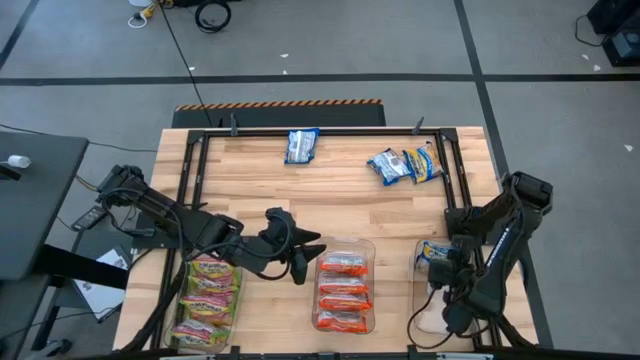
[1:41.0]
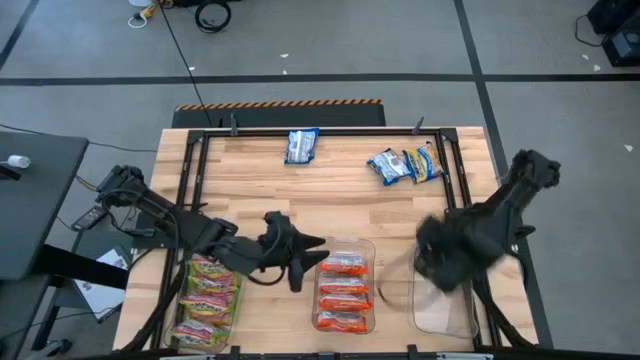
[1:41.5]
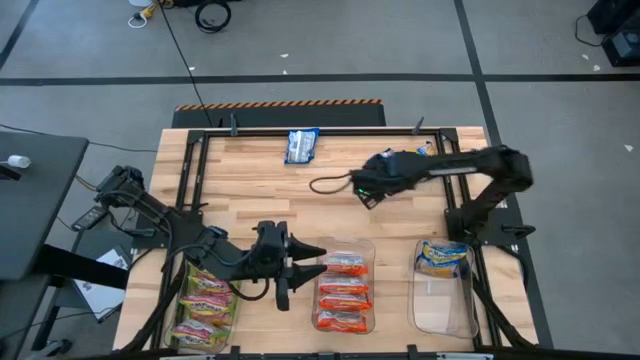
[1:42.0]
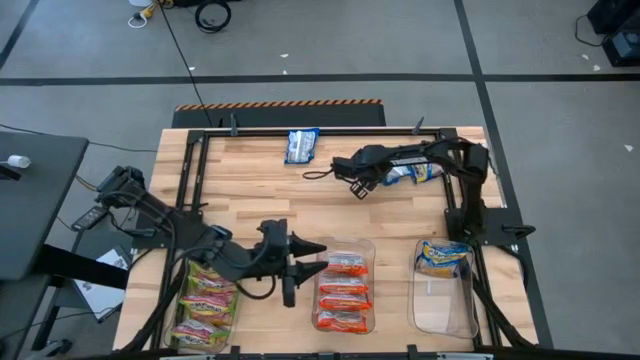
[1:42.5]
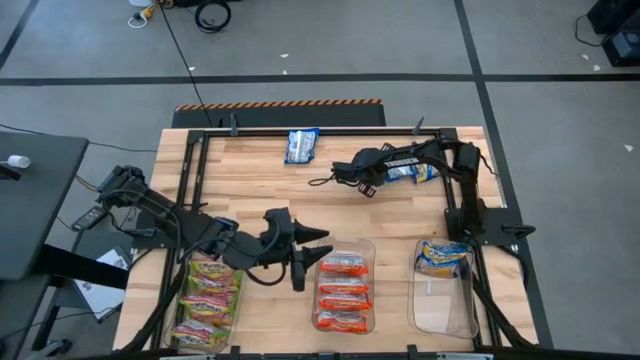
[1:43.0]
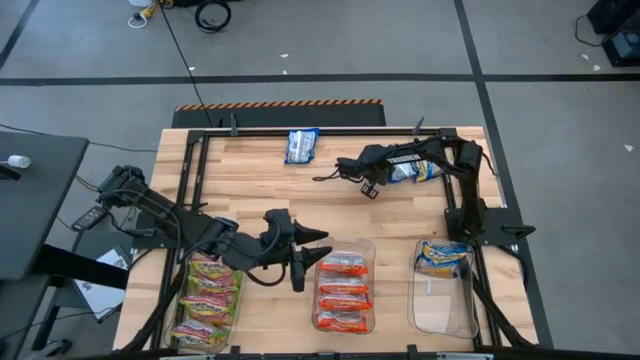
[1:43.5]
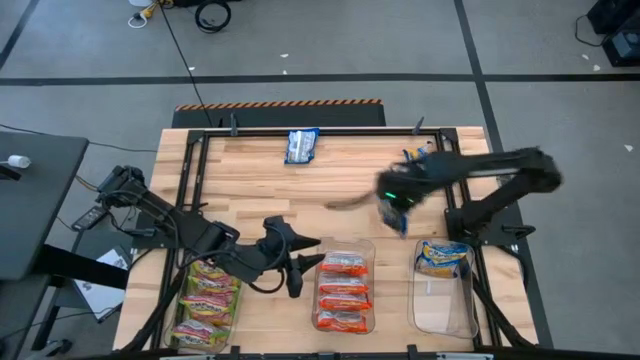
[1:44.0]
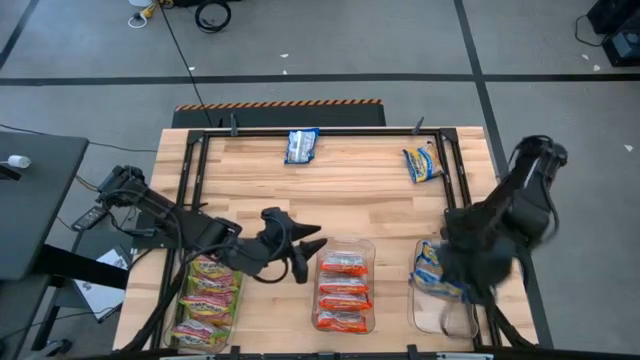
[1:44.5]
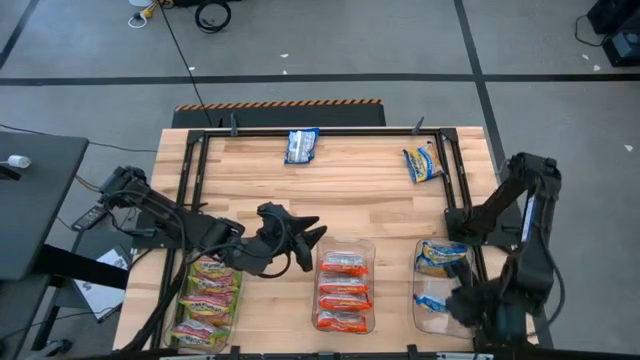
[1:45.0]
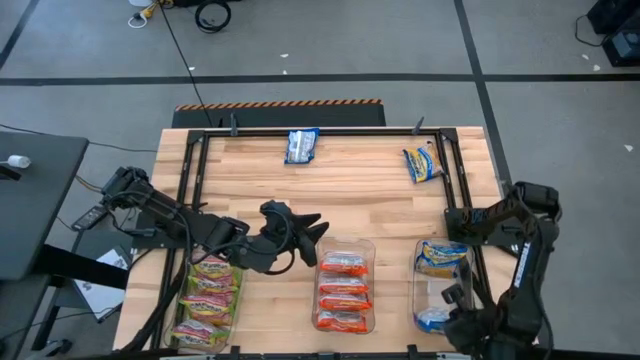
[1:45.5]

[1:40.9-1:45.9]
Task: Sort Maruchan noodles
Put the blue noodle pack into the right transparent bin

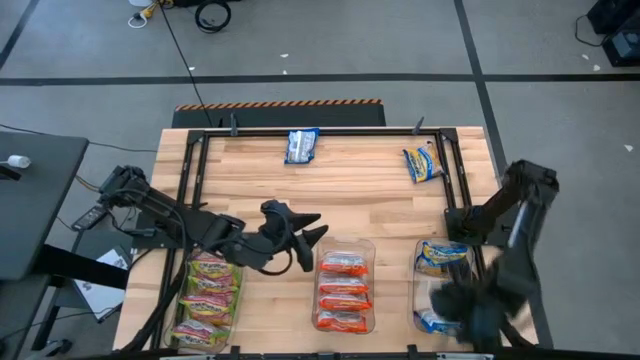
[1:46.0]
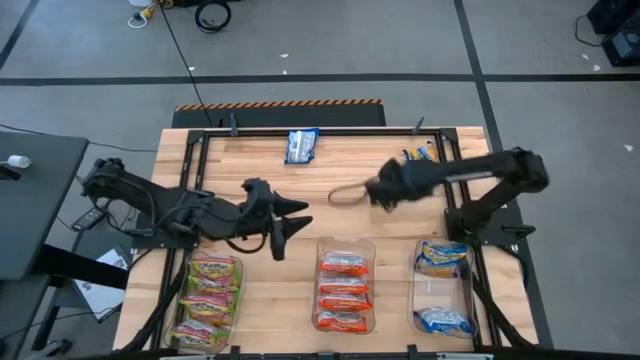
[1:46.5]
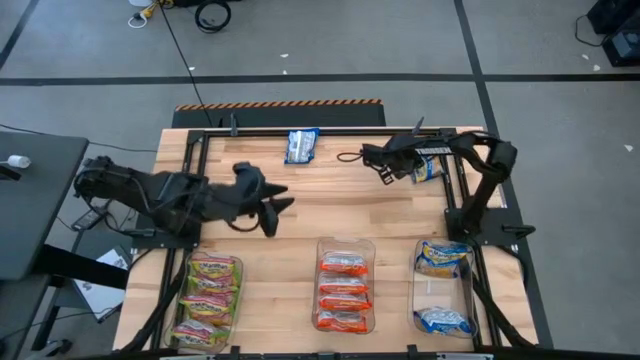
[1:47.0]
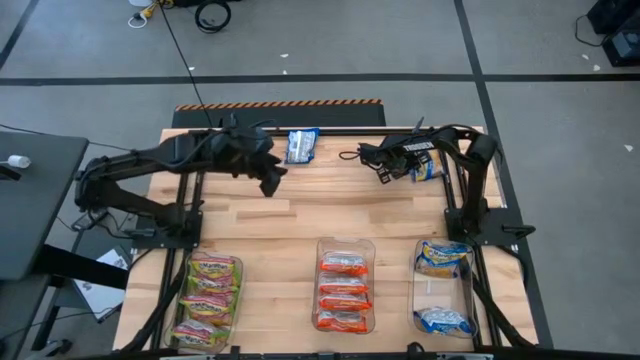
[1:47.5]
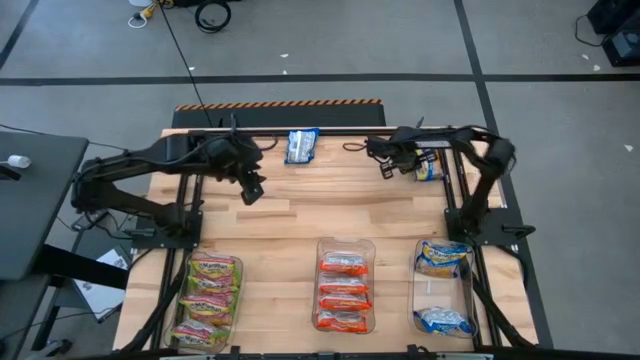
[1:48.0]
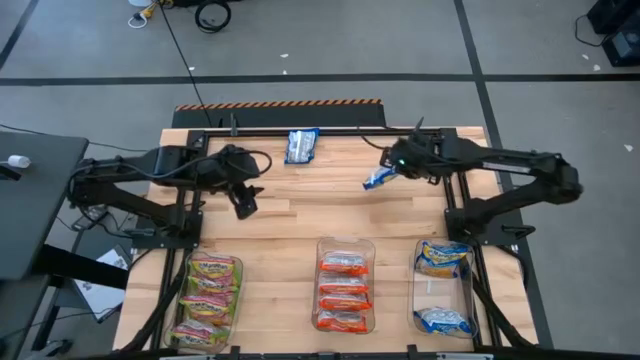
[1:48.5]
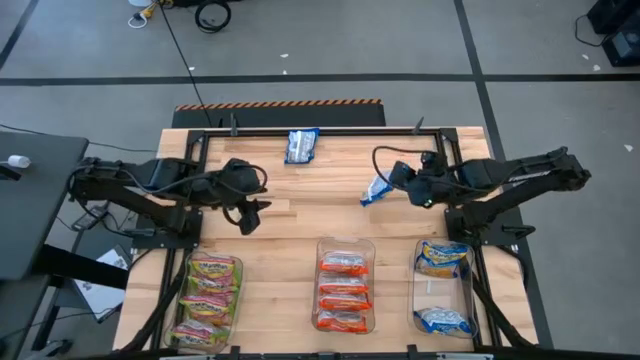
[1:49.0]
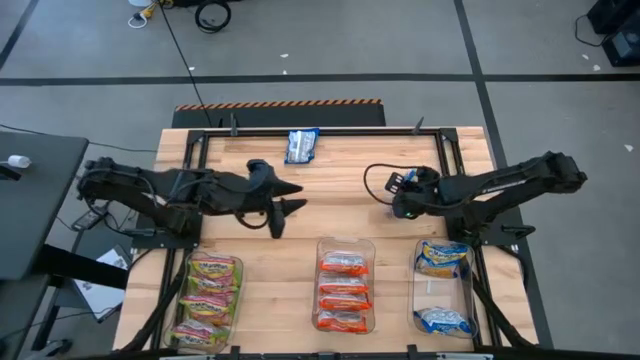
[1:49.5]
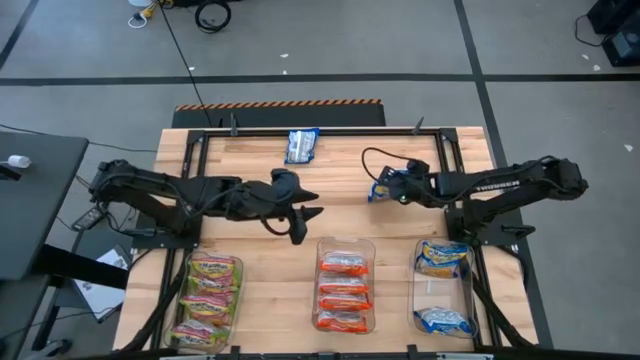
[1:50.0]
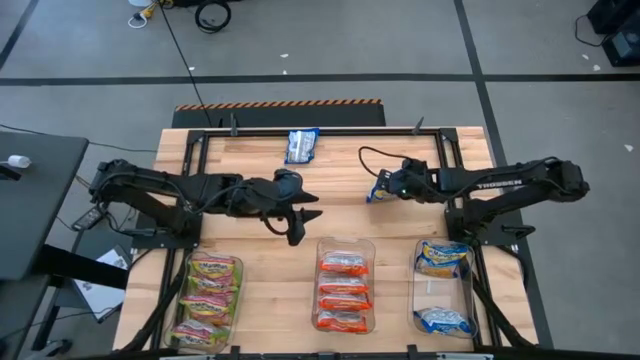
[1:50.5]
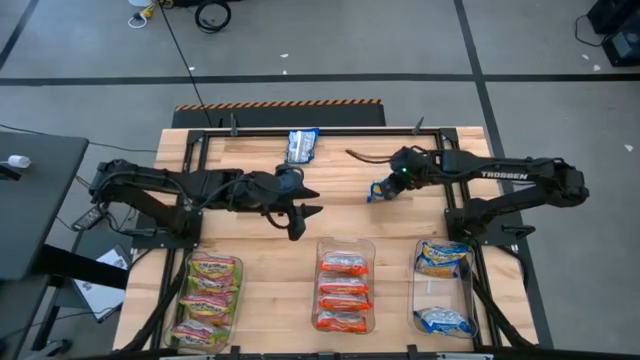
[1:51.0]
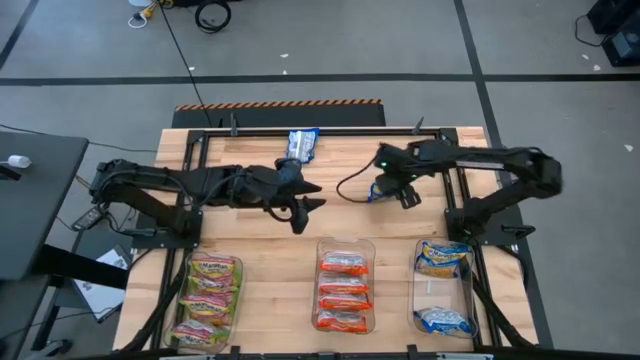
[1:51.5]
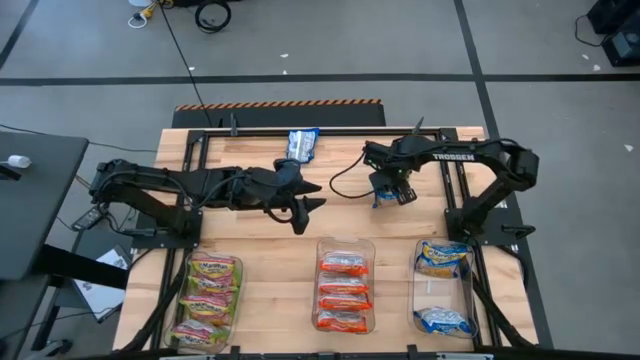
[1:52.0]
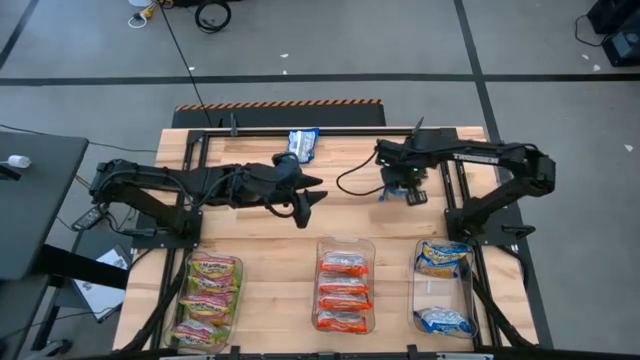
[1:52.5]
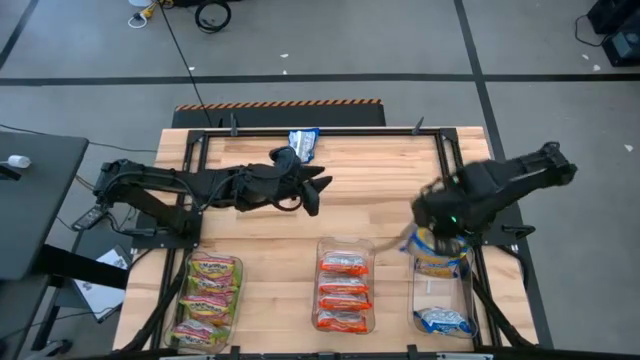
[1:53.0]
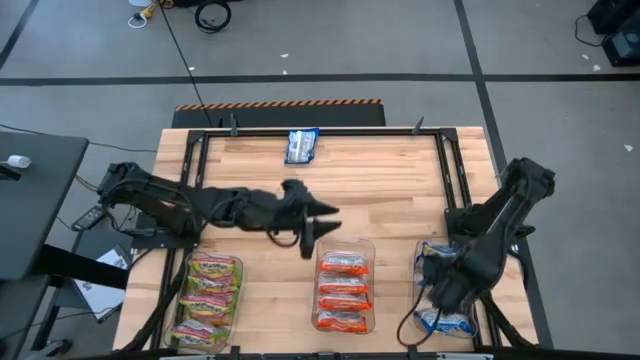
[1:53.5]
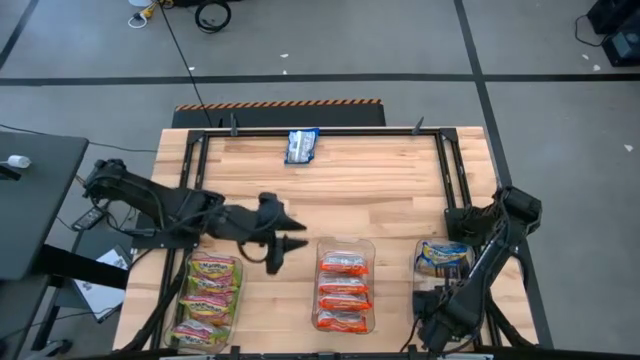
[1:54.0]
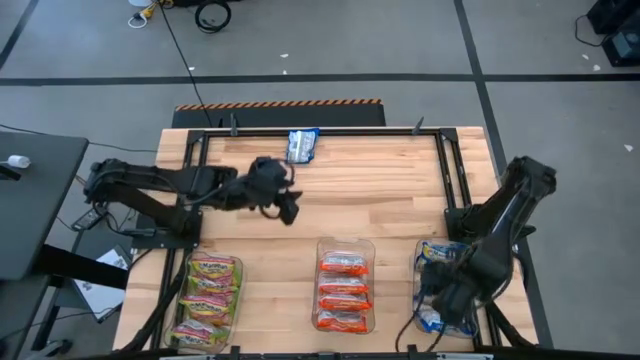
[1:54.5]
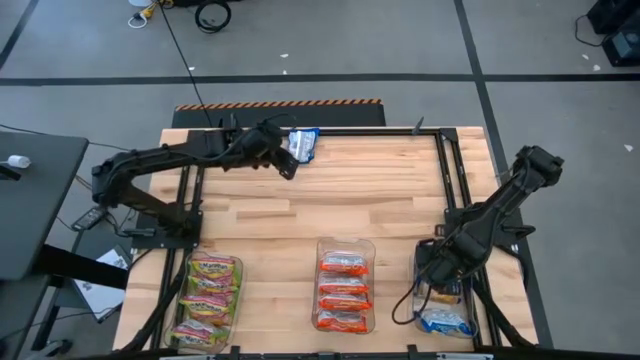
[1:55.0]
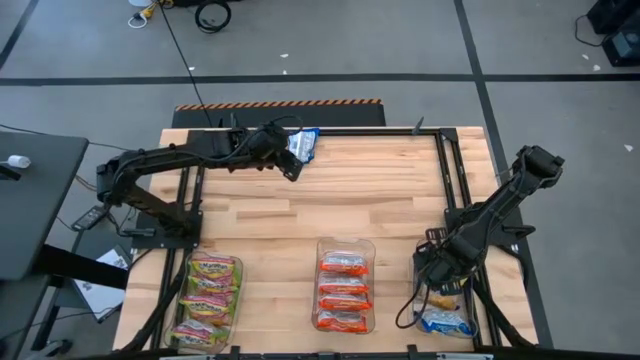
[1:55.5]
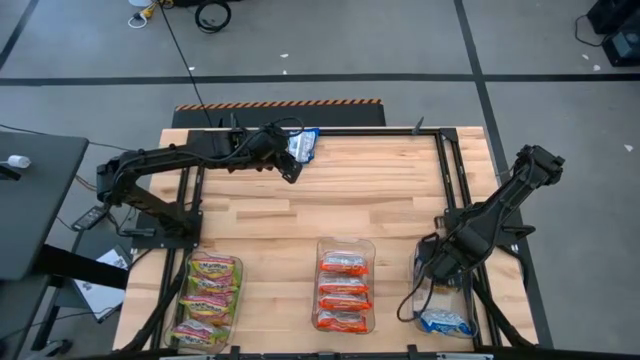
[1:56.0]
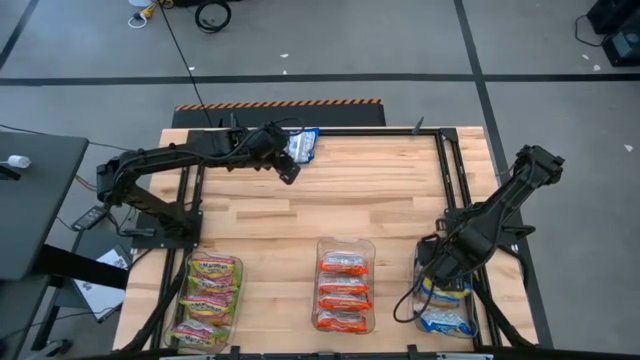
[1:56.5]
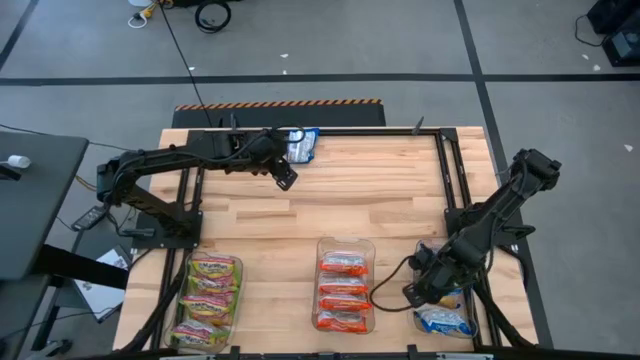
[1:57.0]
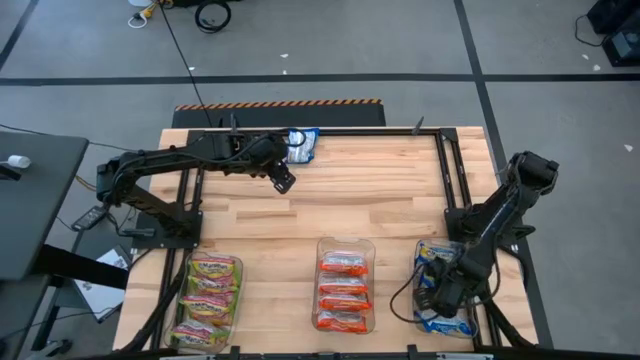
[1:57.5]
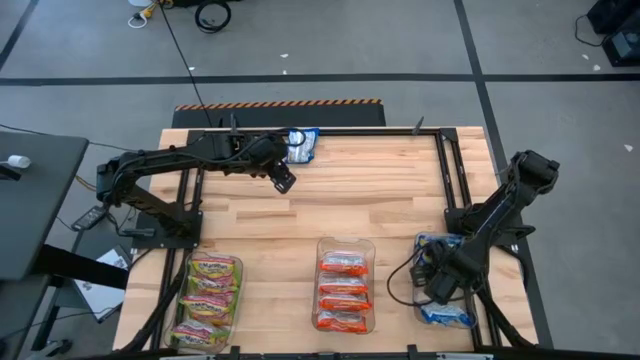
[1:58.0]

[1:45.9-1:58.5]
Put the blue noodle pack into the right transparent bin

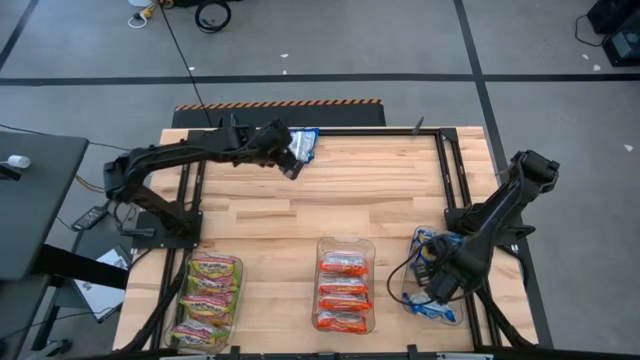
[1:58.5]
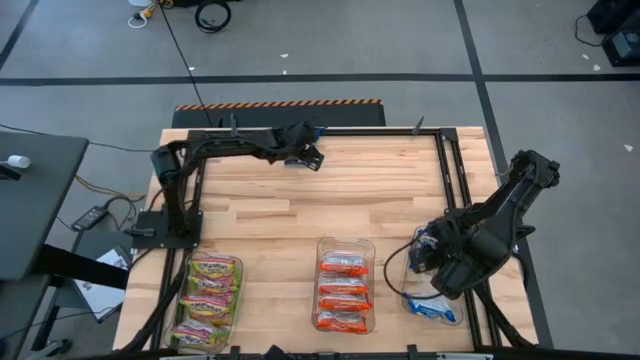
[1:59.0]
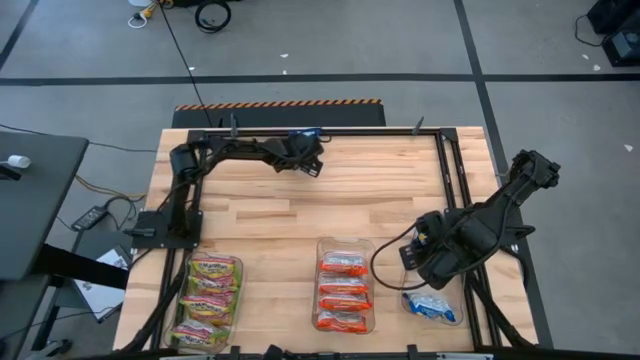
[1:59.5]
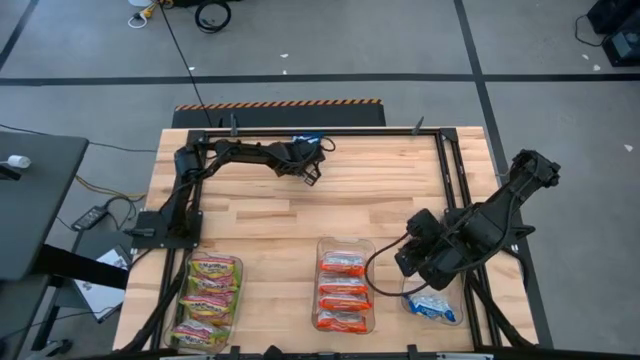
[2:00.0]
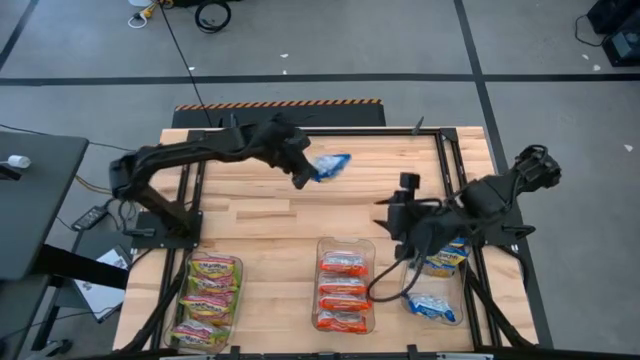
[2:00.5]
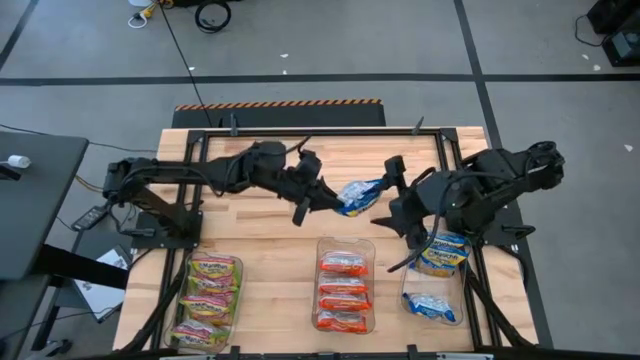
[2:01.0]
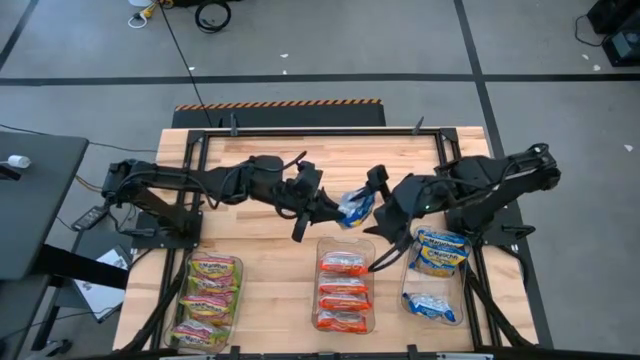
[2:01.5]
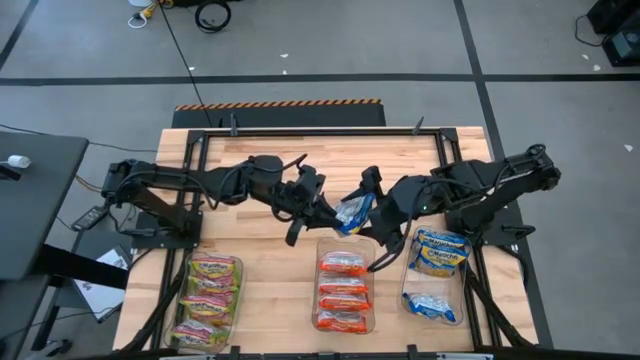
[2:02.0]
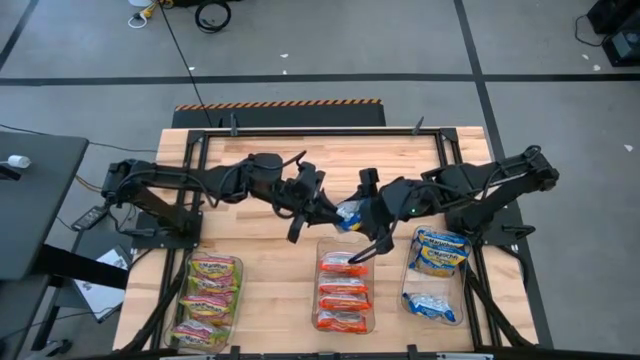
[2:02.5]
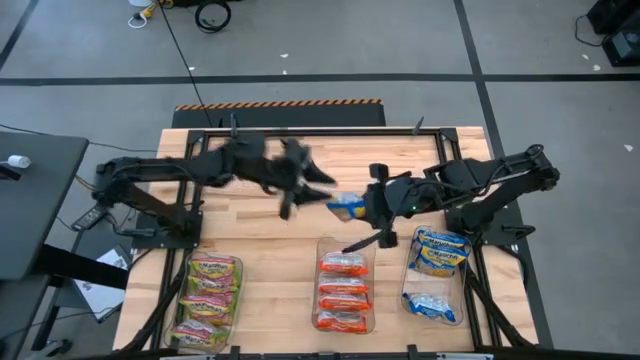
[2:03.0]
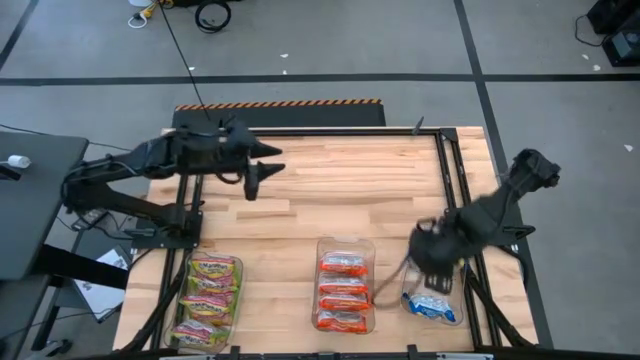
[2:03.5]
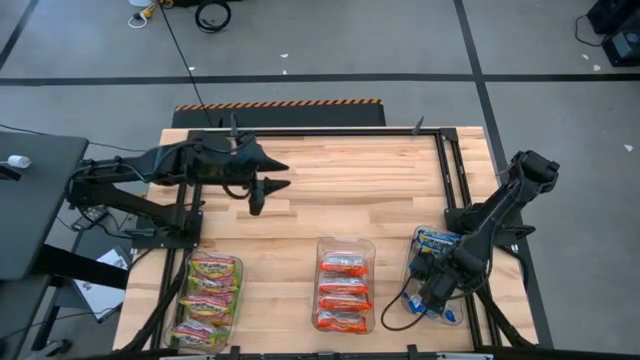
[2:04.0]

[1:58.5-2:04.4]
Put the blue noodle pack into the right transparent bin
